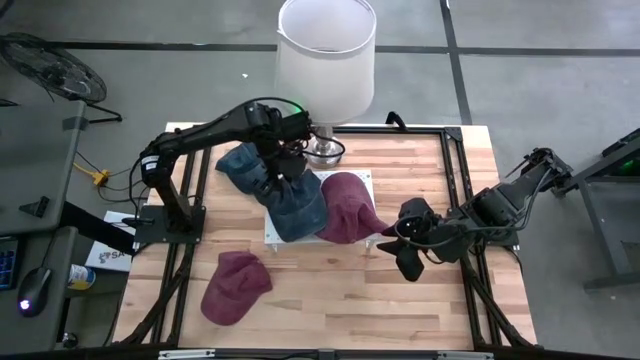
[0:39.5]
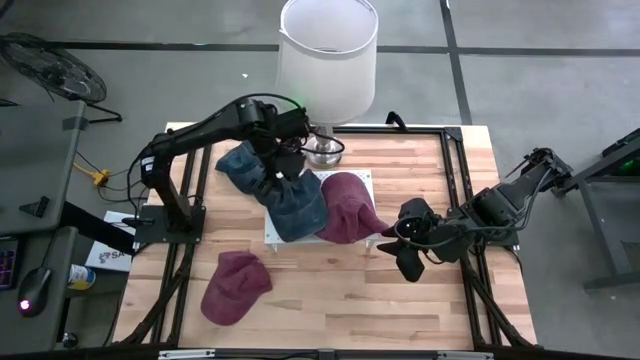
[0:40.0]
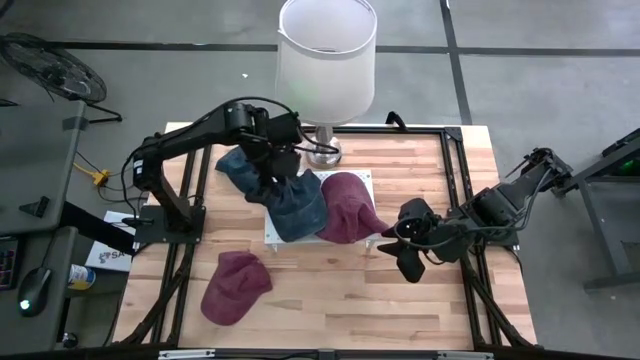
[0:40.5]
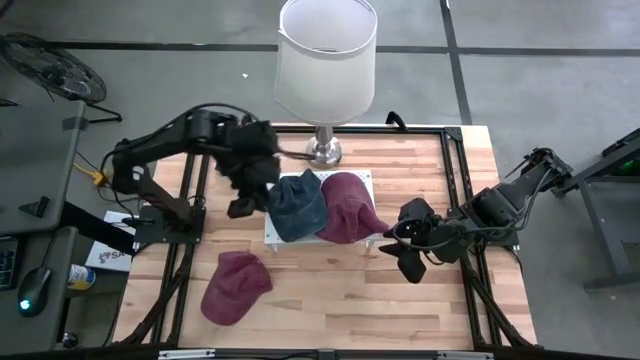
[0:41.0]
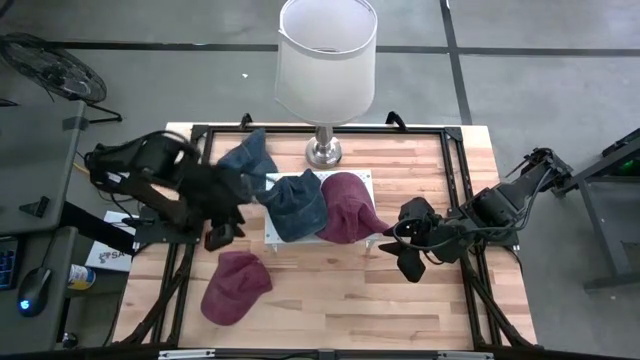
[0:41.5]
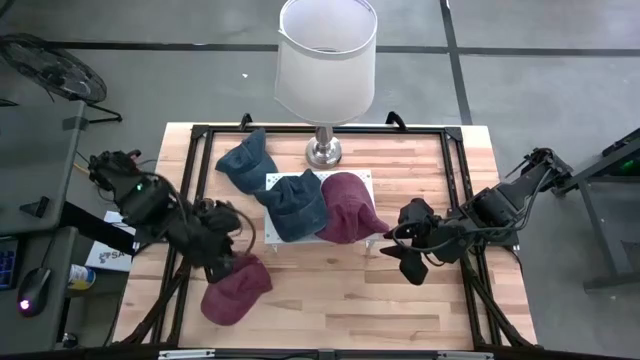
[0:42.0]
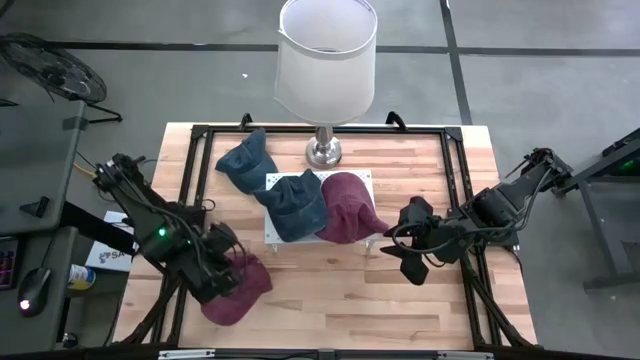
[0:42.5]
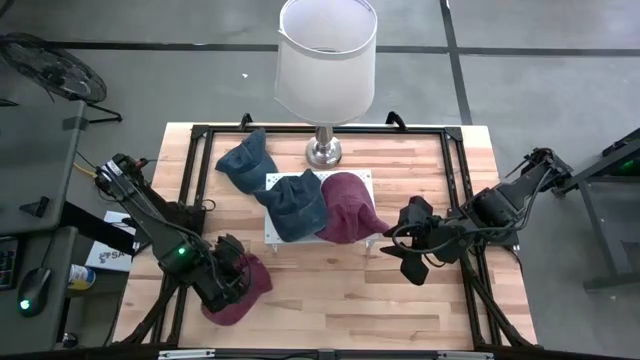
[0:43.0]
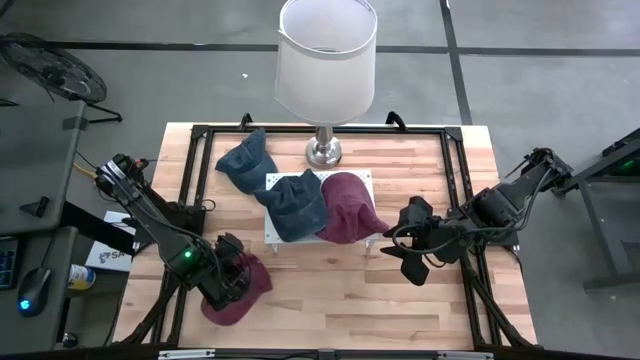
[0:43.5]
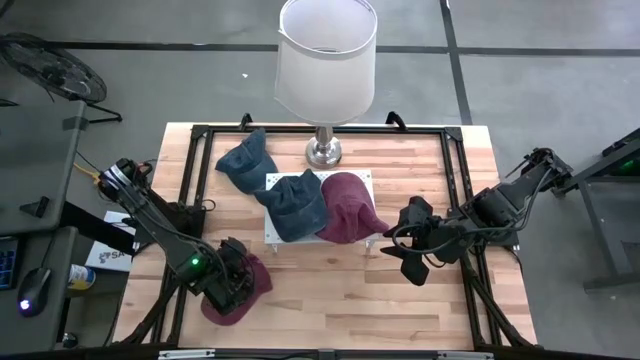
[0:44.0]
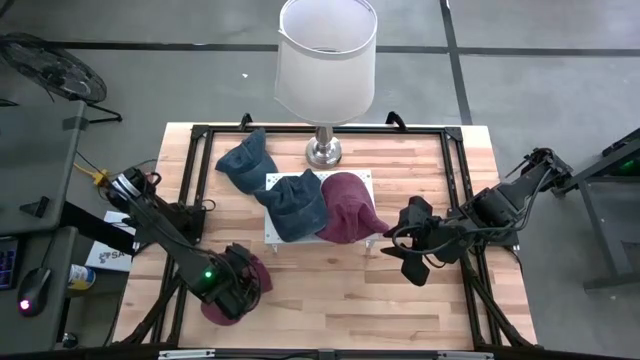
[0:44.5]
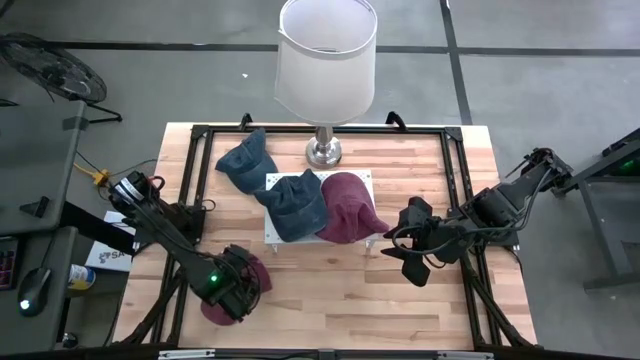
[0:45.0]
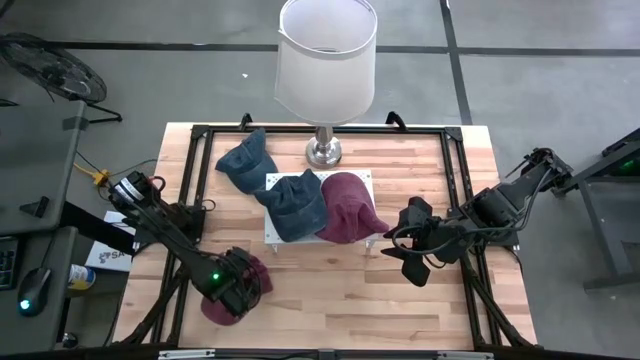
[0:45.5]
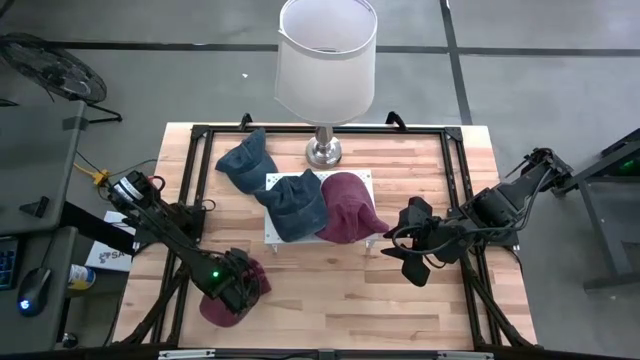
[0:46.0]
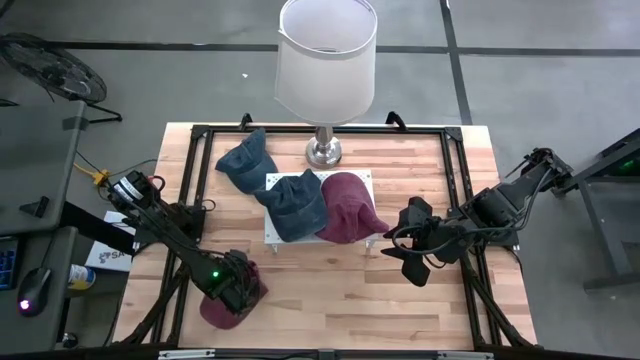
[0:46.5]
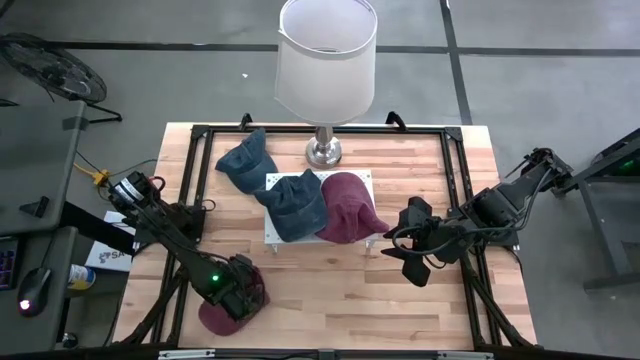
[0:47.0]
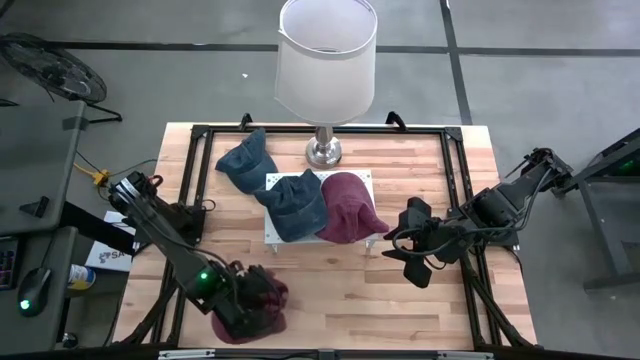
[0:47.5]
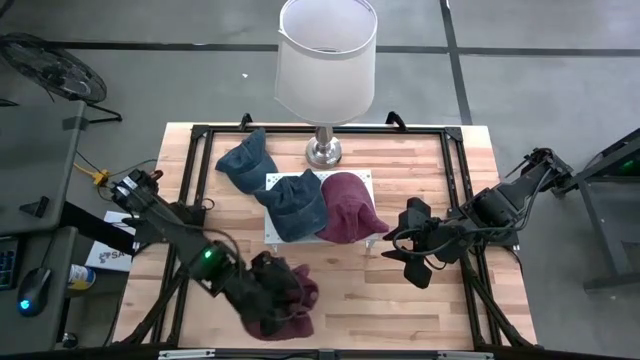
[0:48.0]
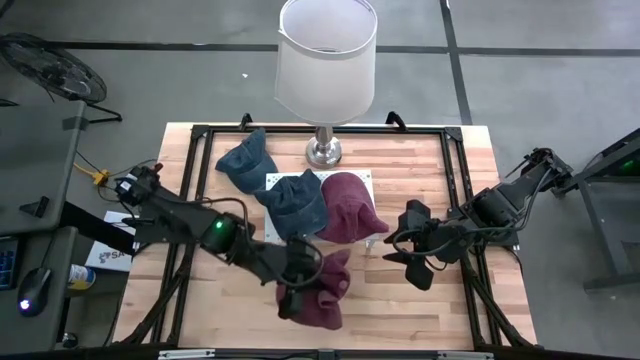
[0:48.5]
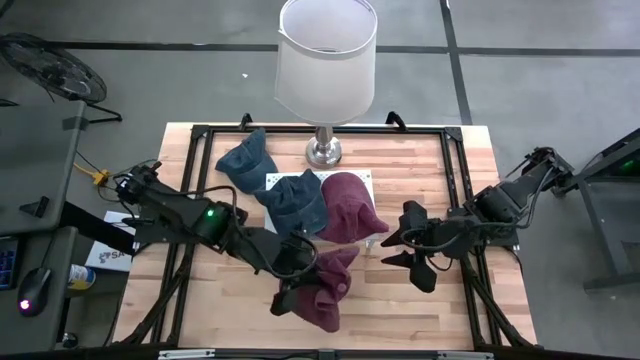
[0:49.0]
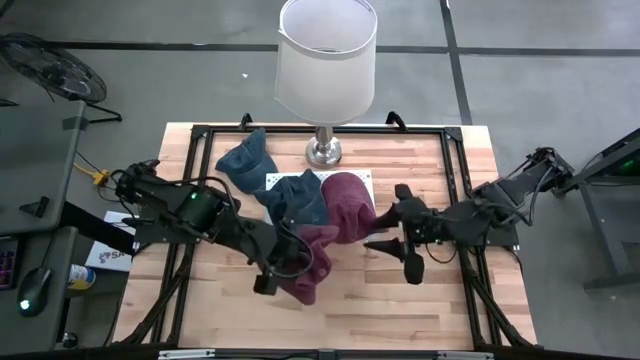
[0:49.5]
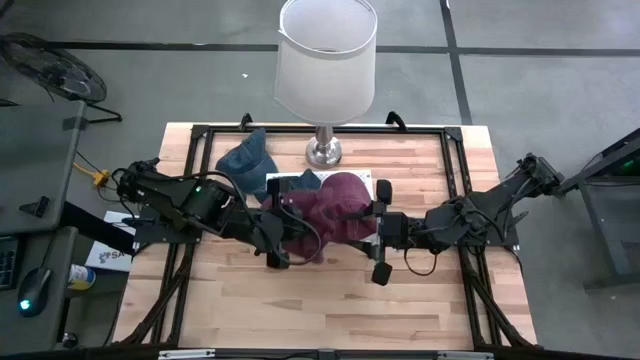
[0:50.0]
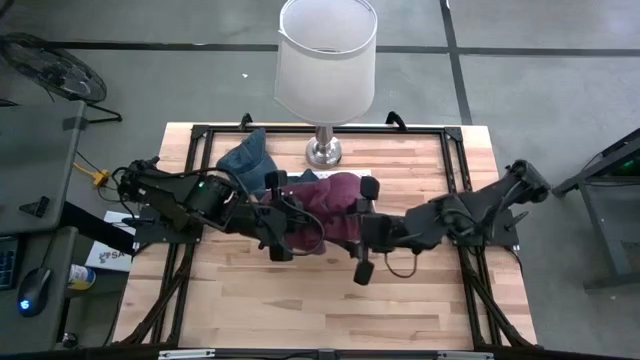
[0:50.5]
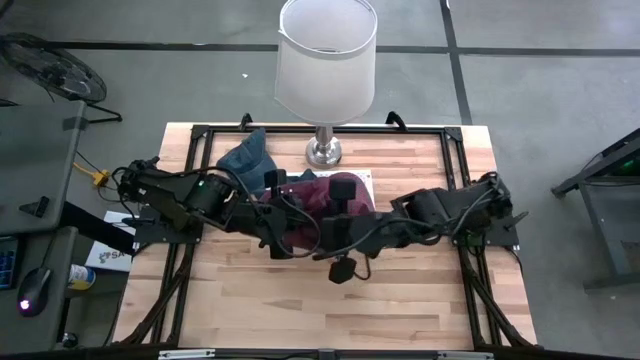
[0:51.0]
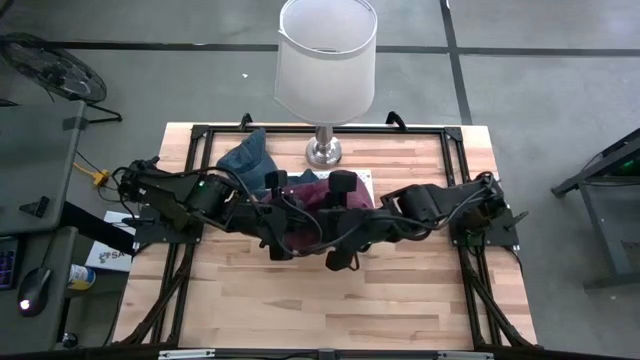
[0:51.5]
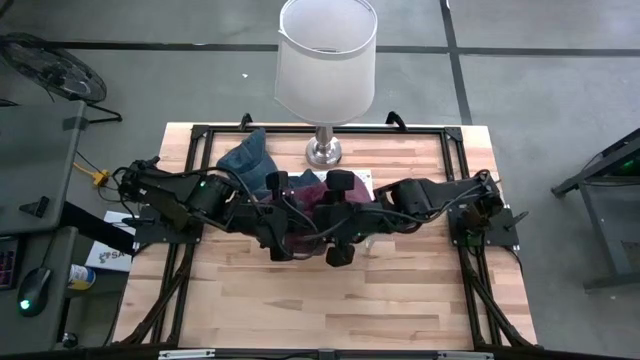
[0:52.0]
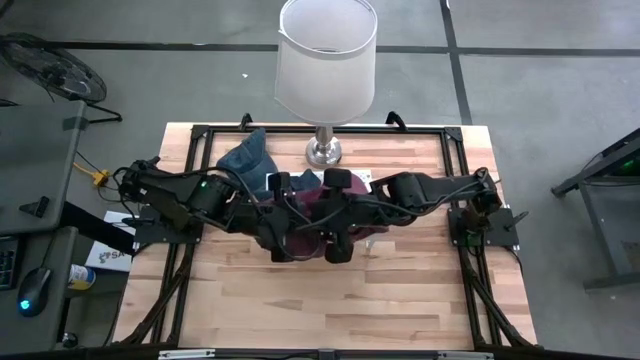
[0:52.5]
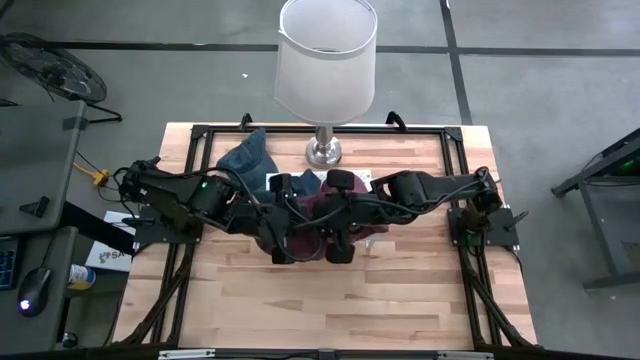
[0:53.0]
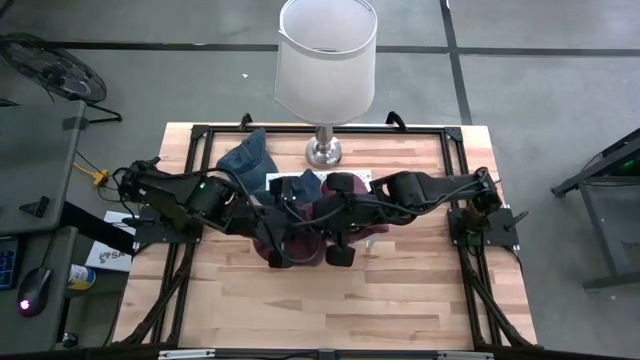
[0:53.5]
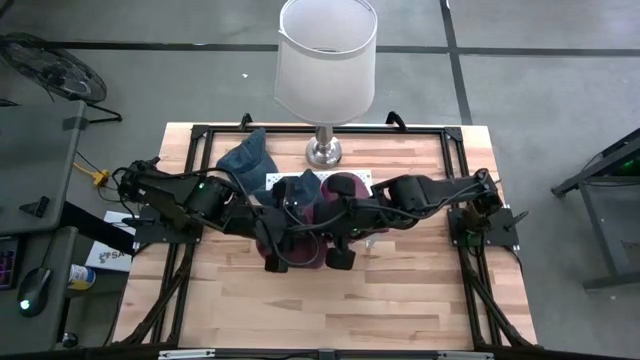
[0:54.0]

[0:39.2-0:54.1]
Task: Pick & Place hat
Stack the red cap on top of the other red cap on the shelf

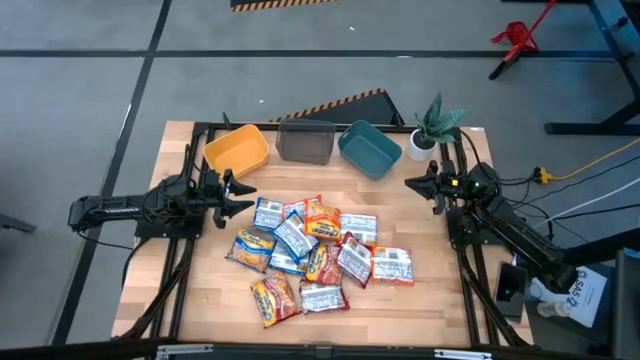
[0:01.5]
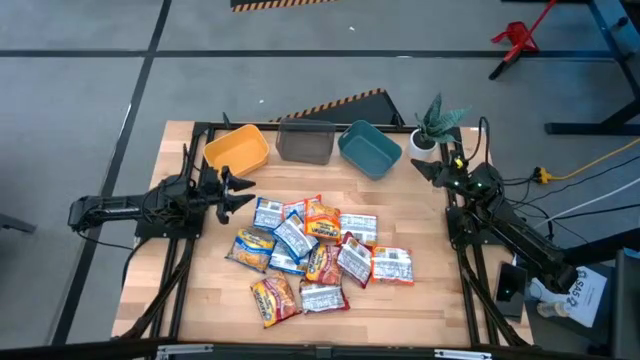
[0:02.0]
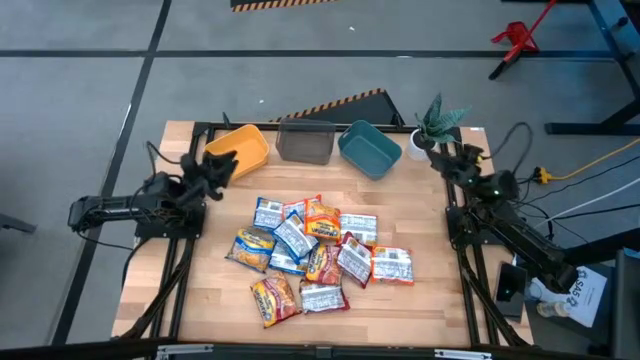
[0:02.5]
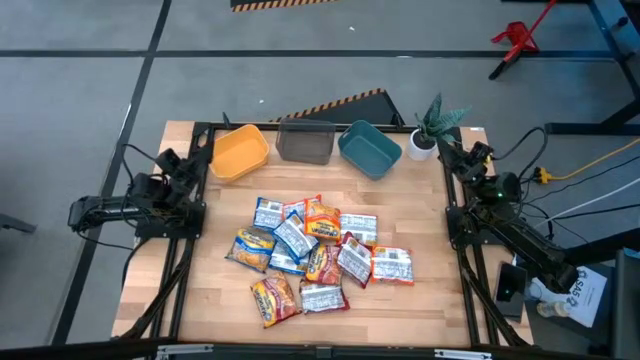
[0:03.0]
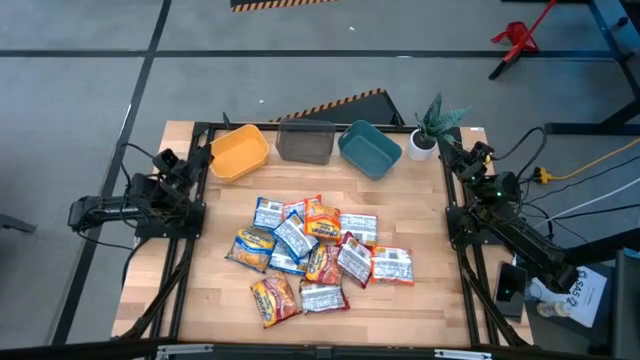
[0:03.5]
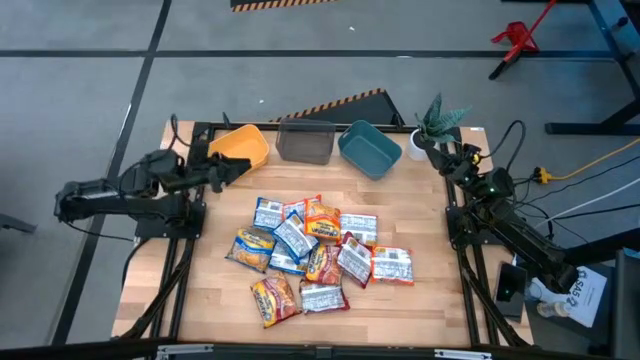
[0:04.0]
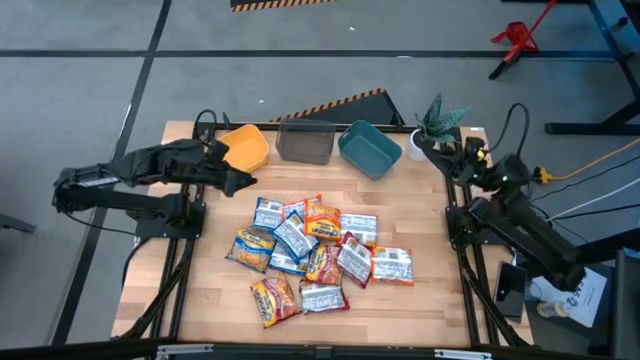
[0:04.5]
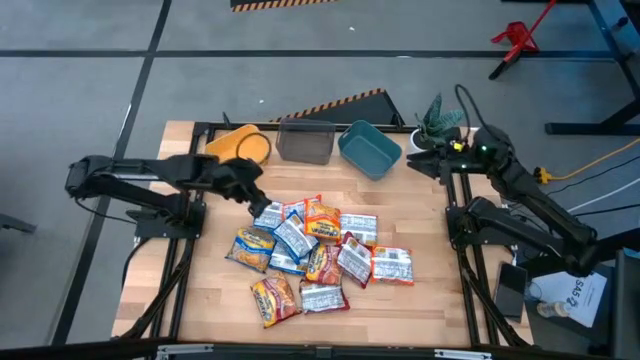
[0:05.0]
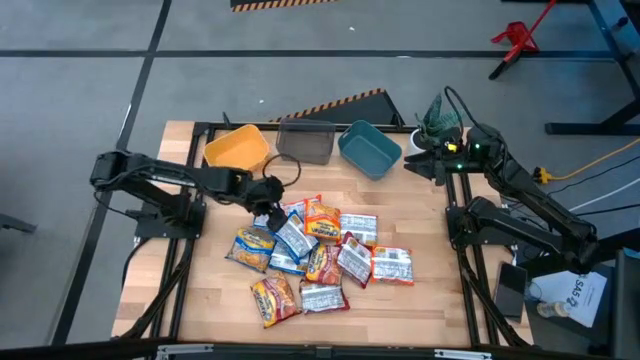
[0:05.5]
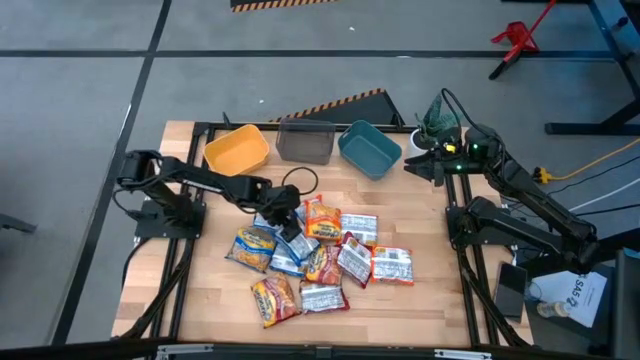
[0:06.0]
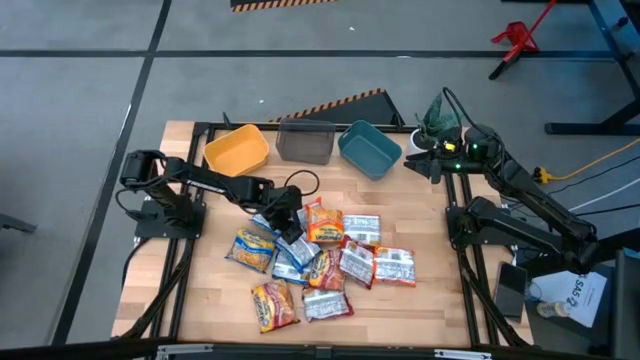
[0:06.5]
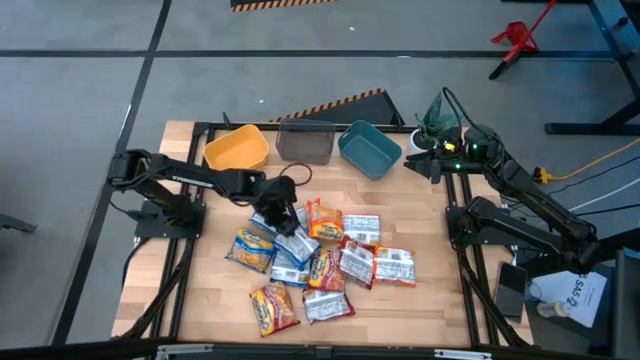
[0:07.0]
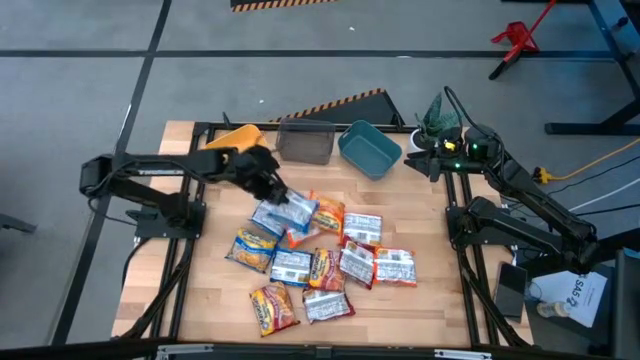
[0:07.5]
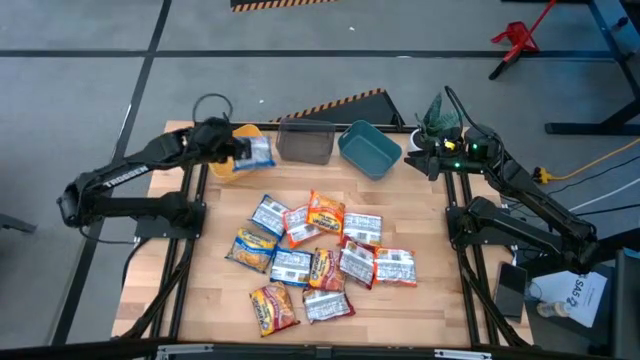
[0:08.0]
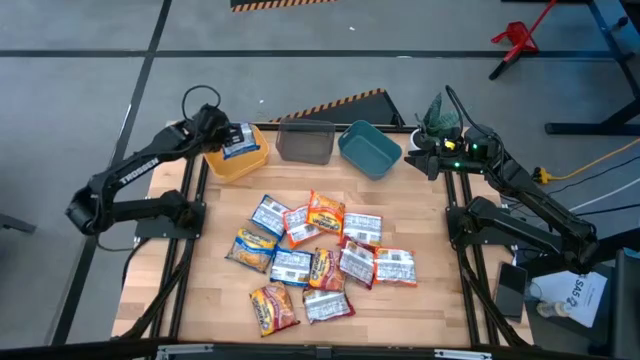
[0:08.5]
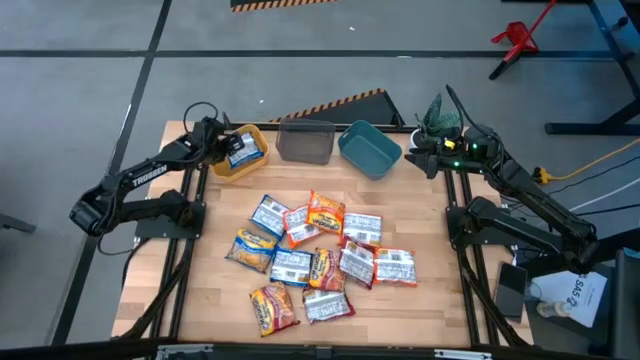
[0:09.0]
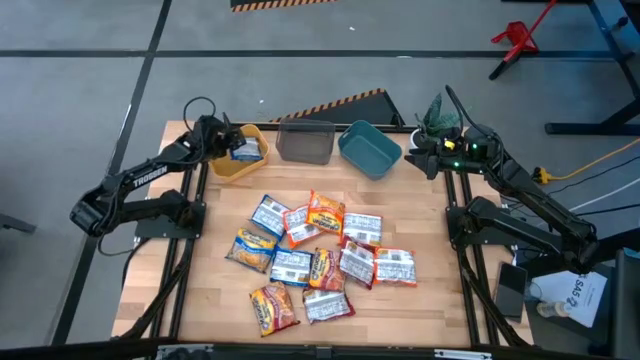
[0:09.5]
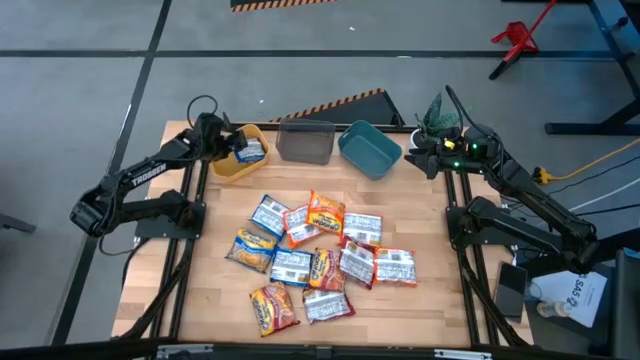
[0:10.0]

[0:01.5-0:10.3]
Task: Sort Maruchan noodles
Put the blue noodle pack into the yellow bin
